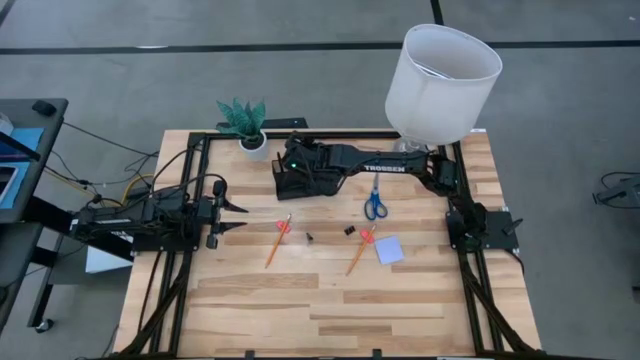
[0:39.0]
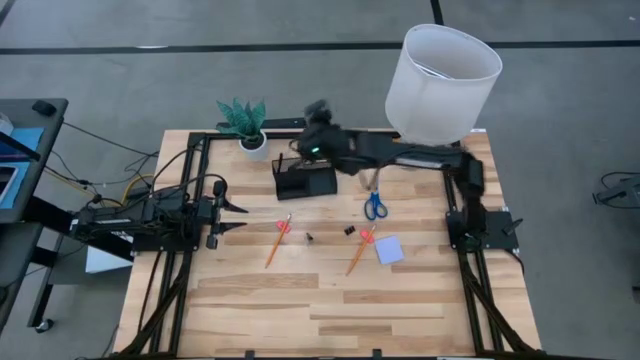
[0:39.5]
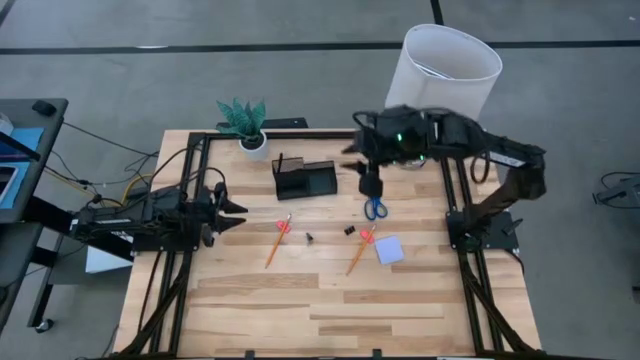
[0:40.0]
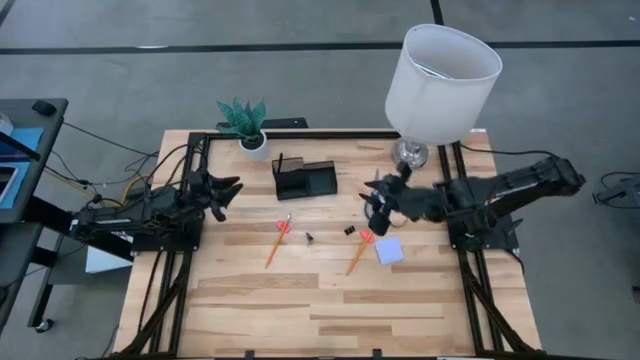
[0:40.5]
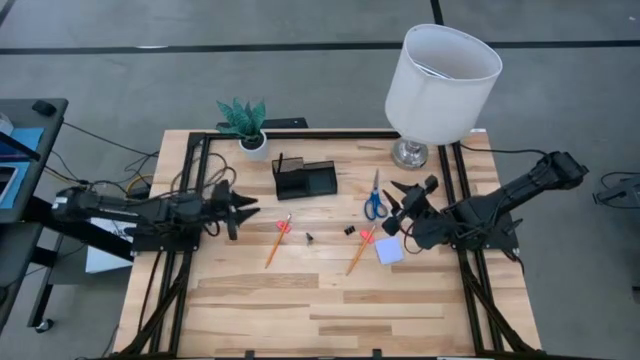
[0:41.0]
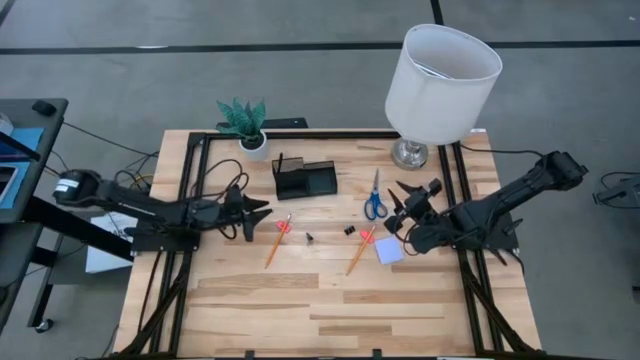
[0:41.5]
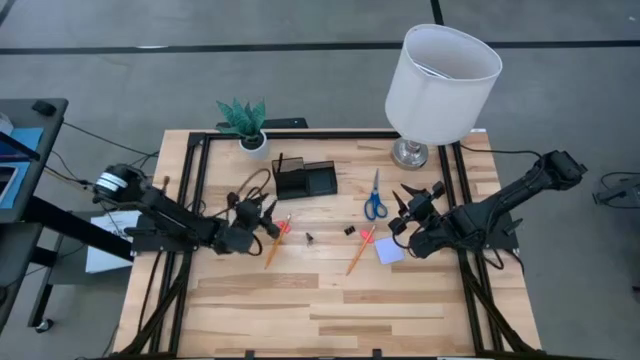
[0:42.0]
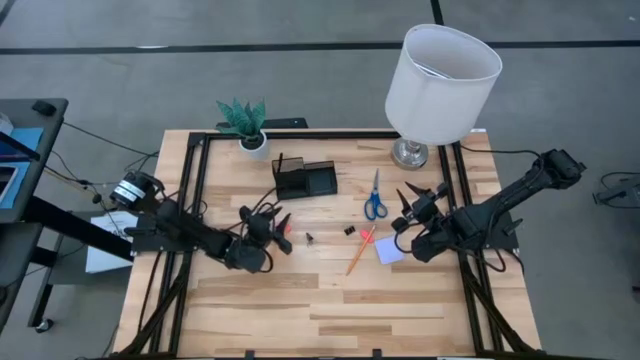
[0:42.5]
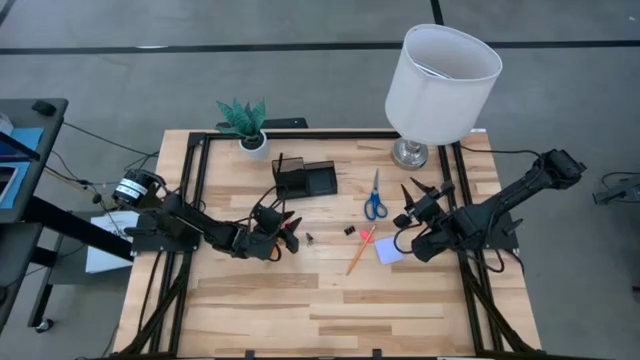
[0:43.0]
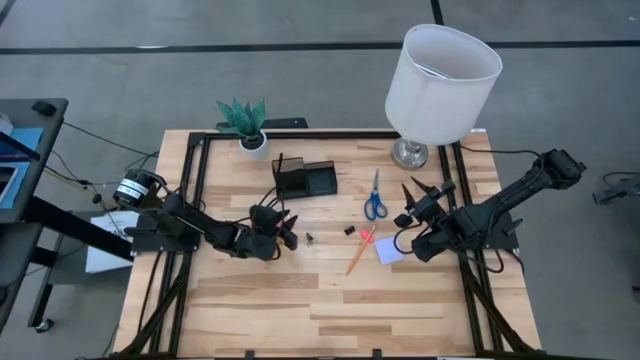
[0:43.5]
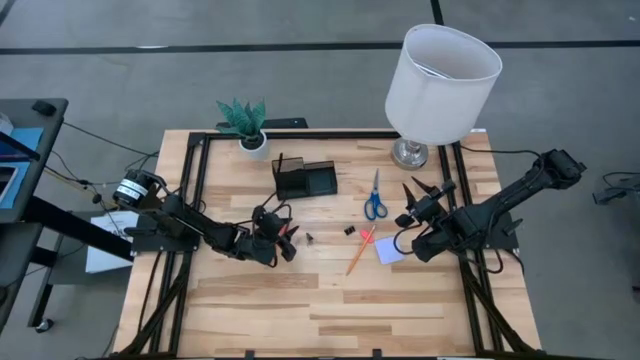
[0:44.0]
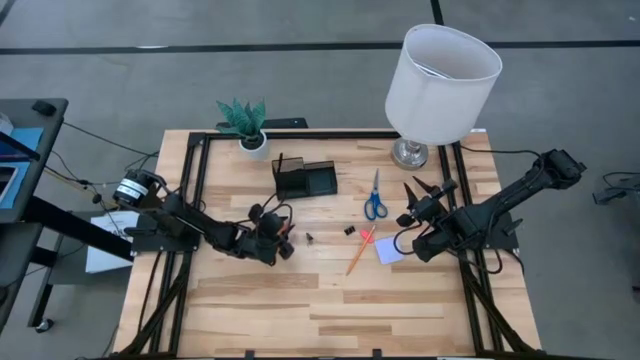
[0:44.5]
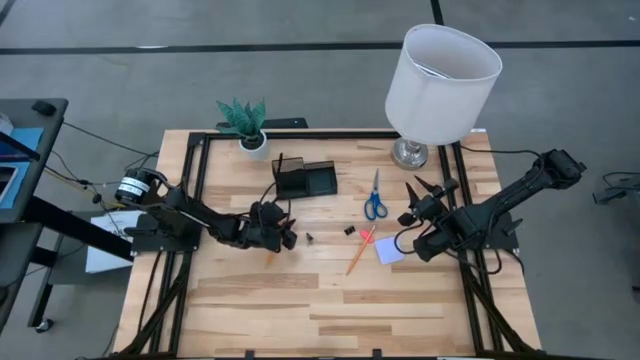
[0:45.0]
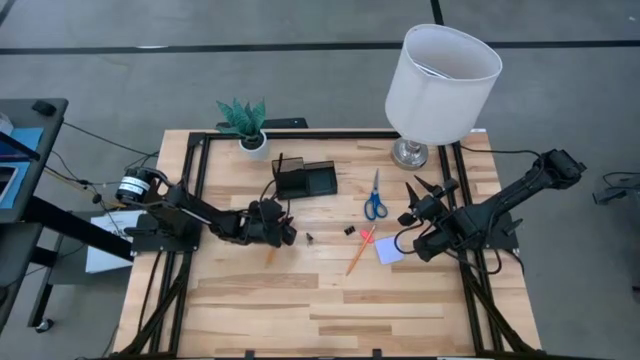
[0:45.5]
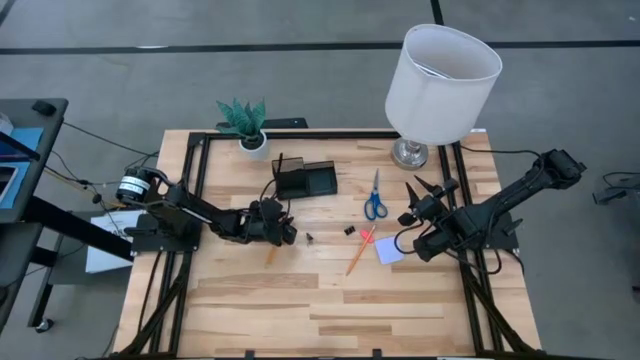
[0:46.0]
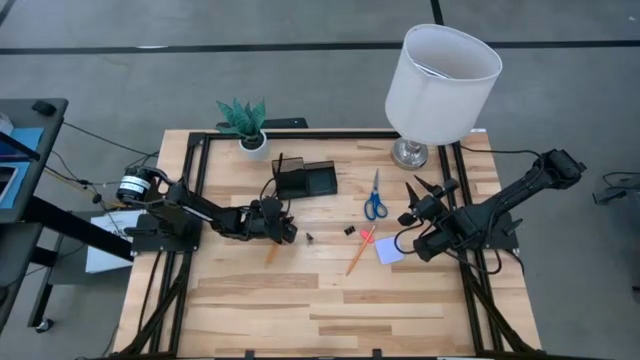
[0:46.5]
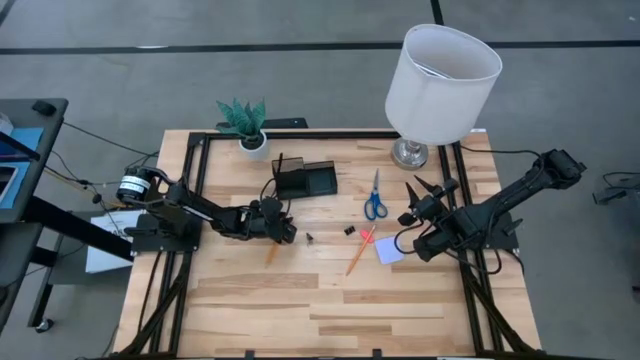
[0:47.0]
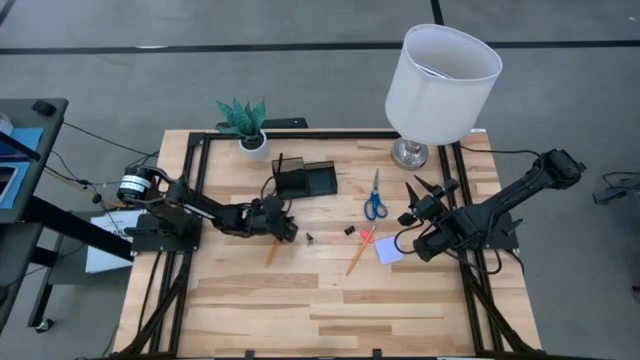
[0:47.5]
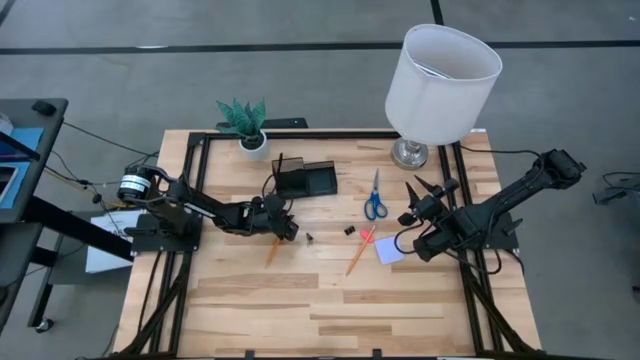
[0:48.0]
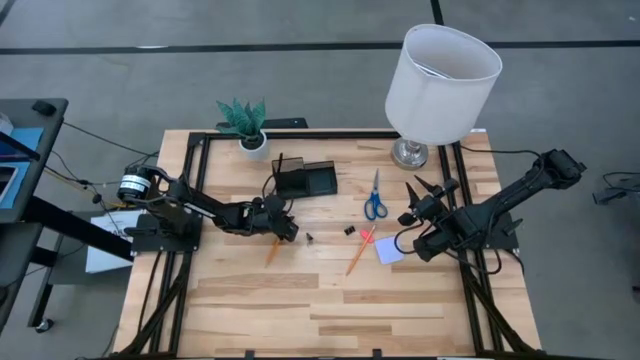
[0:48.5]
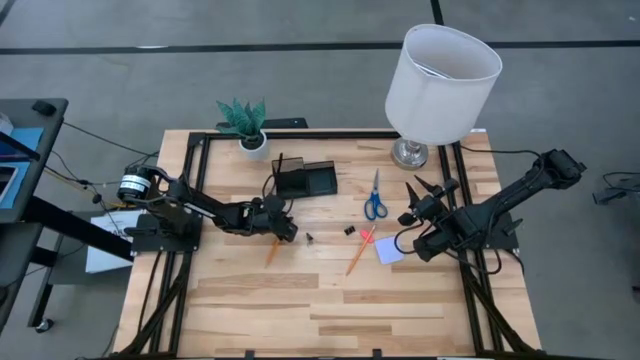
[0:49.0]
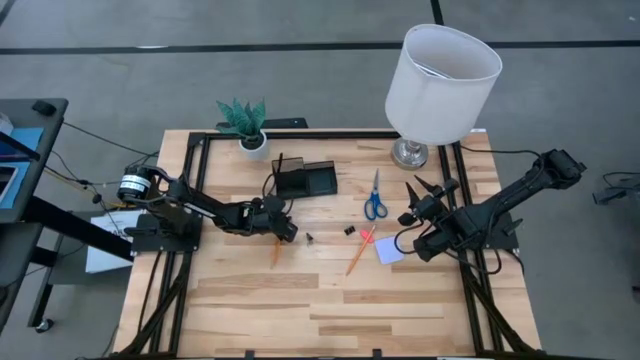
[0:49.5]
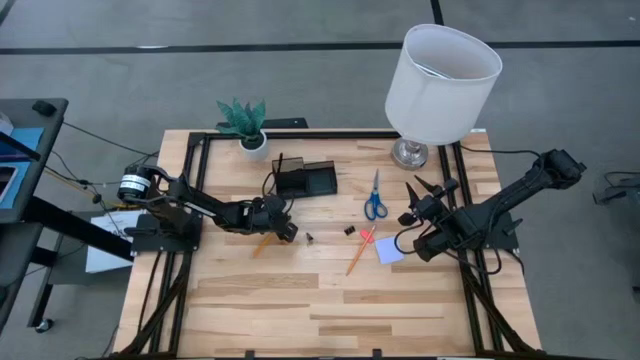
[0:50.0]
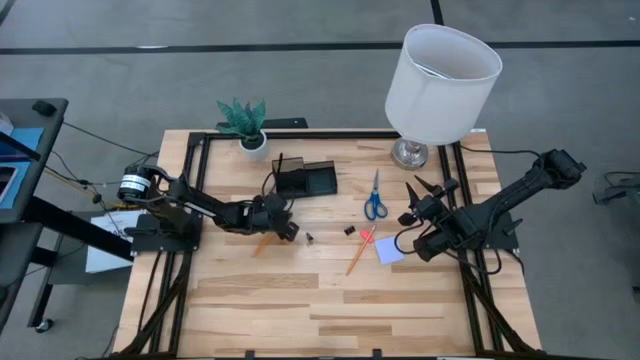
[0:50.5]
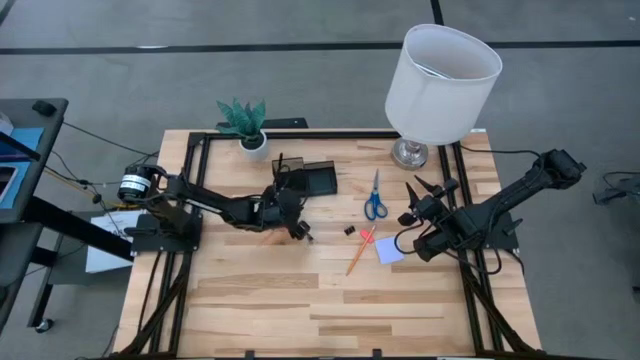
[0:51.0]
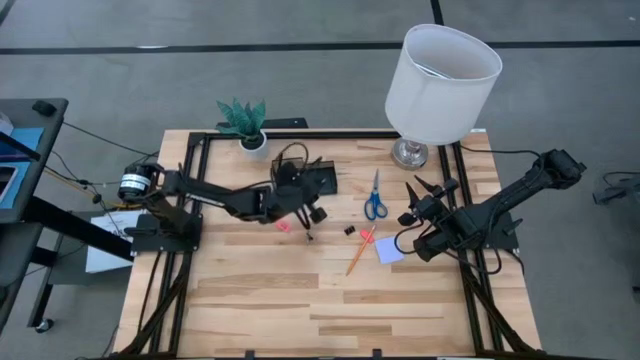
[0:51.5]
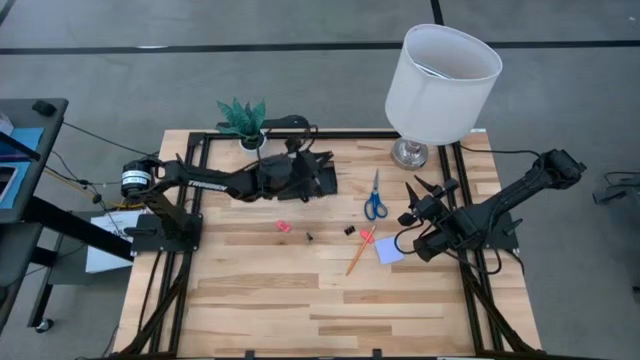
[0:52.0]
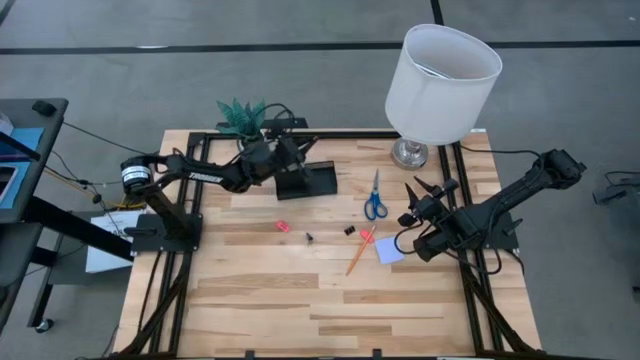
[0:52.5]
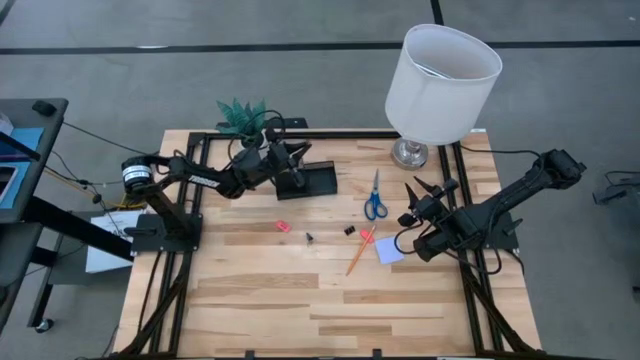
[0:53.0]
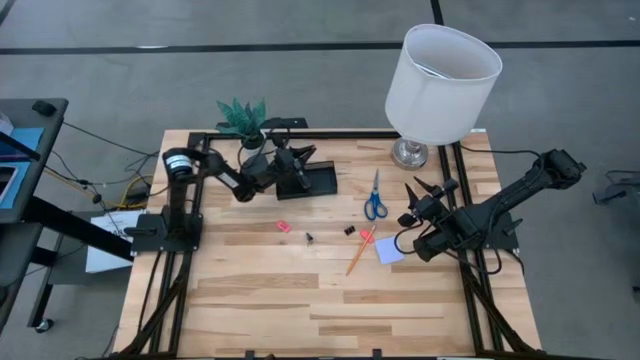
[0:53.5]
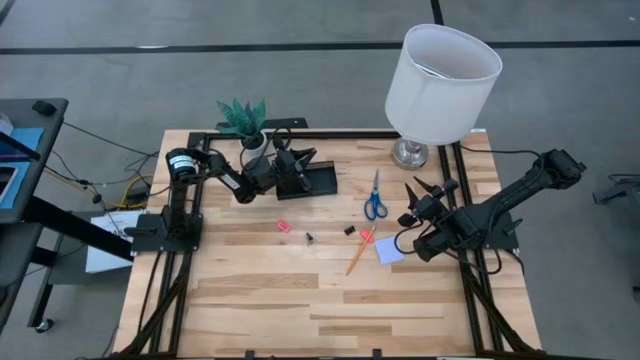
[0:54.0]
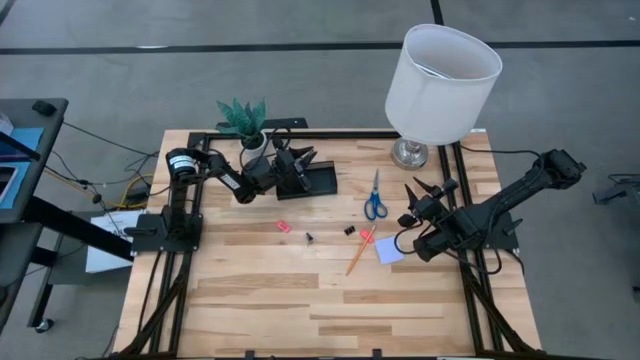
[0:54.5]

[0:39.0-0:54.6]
Task: Pick and place office supplies into organizer
Put the left yellow pencil into the black desk organizer

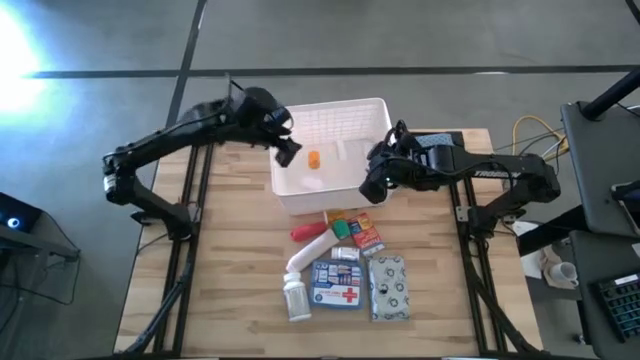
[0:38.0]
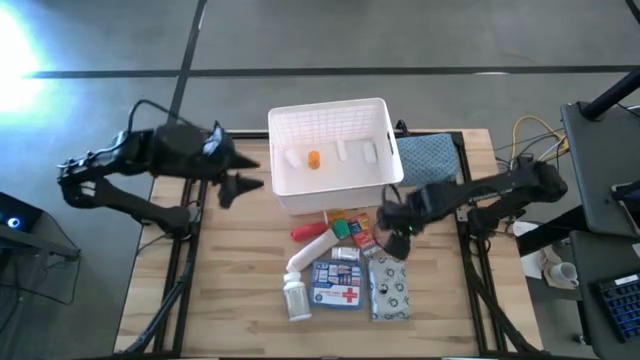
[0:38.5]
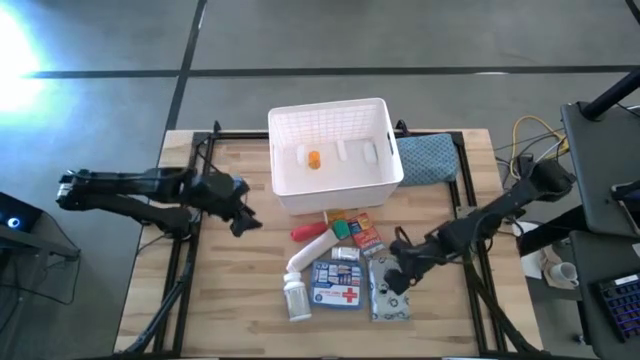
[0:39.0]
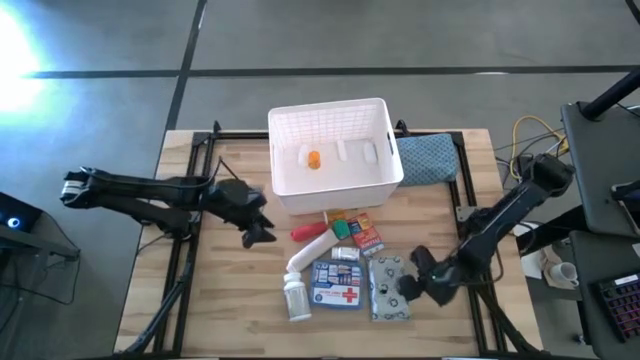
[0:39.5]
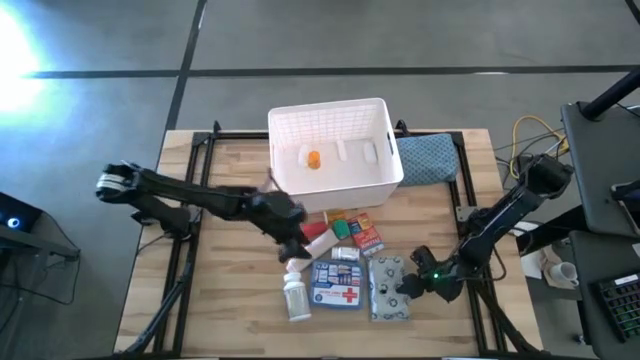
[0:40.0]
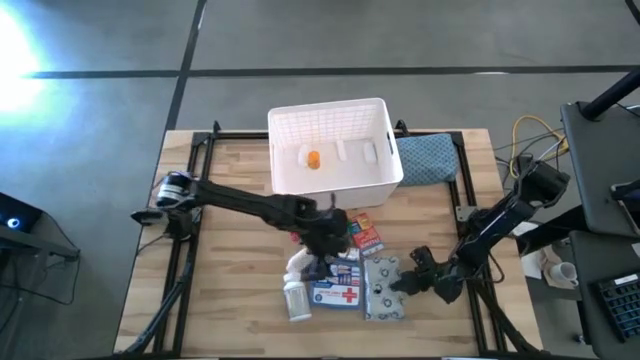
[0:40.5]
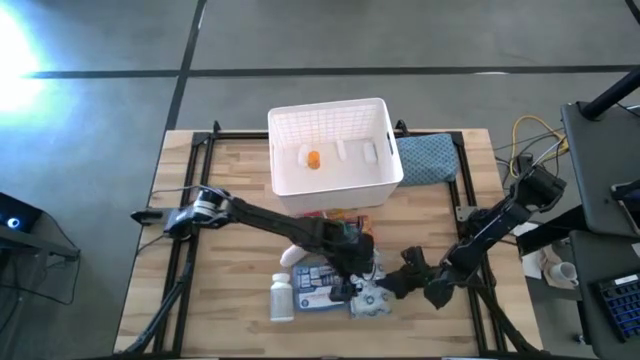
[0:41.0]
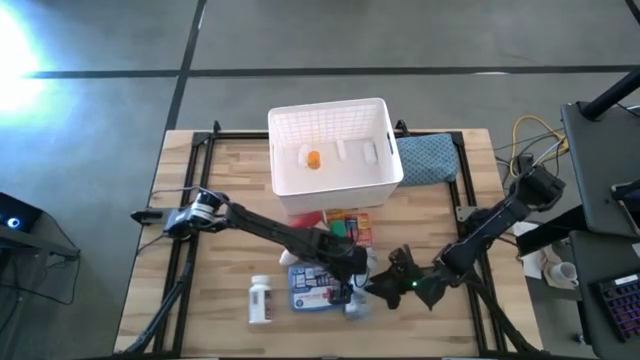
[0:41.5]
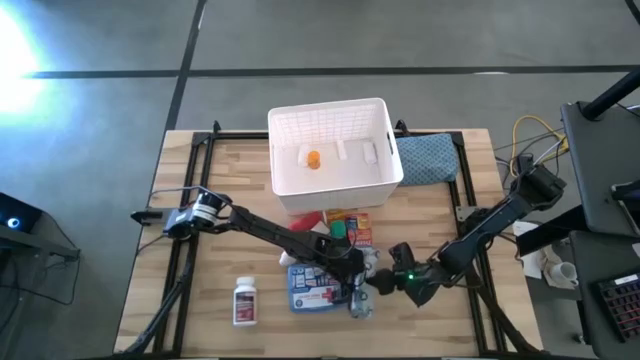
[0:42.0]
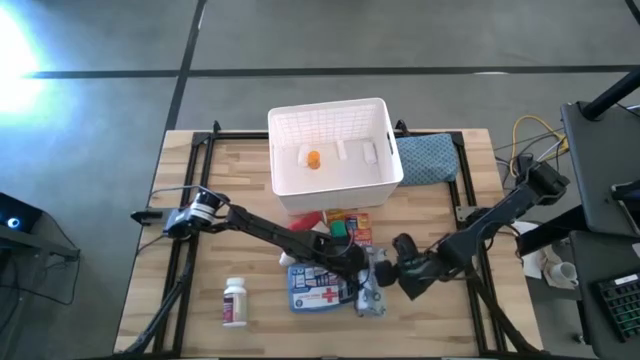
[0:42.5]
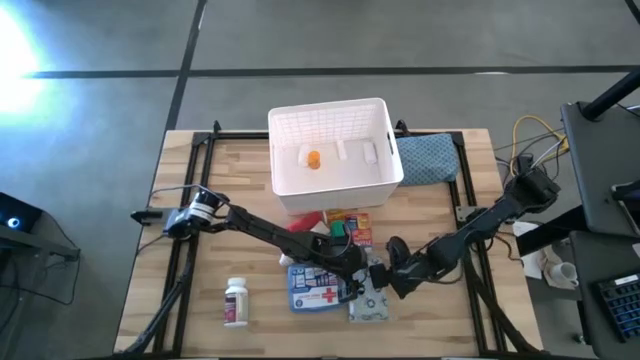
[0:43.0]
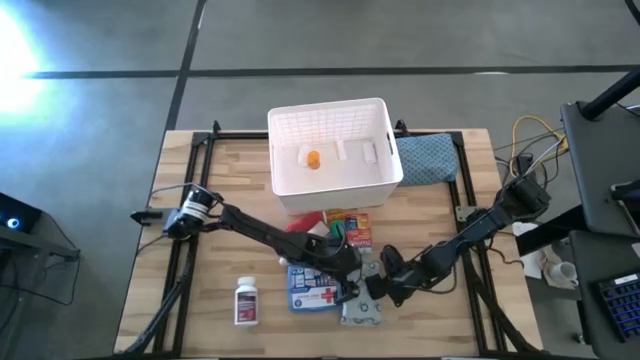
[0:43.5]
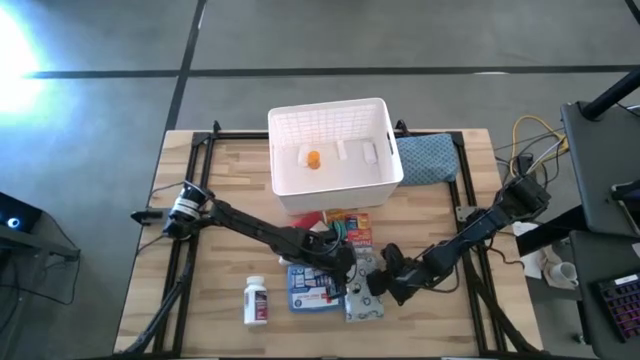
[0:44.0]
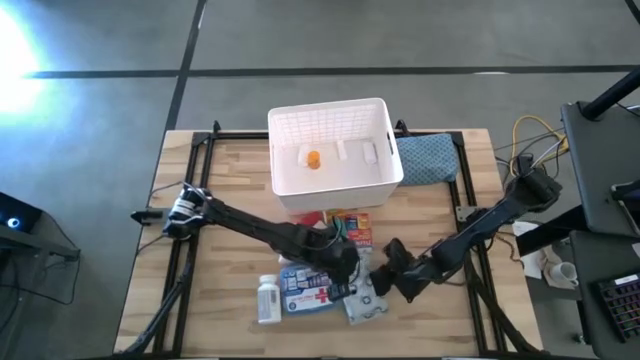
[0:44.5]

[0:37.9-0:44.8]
Task: Pick & place medical supplies in basket/bin
Put the white mailer bag into the white container
